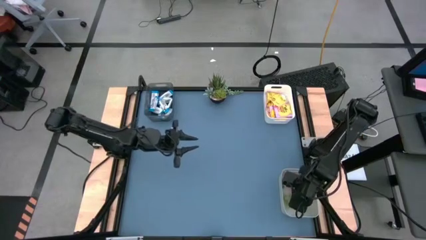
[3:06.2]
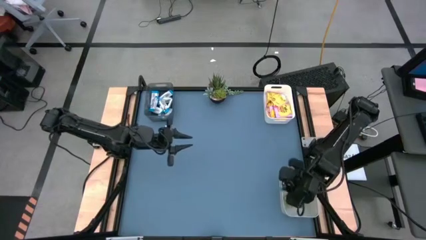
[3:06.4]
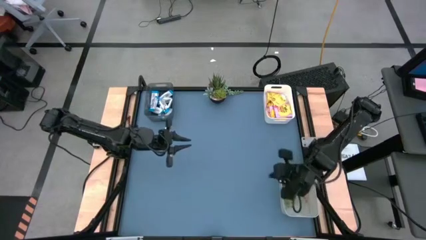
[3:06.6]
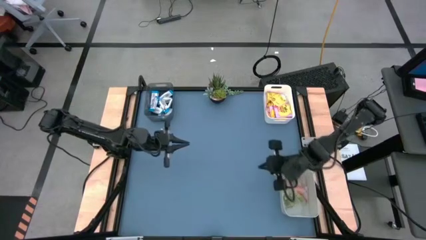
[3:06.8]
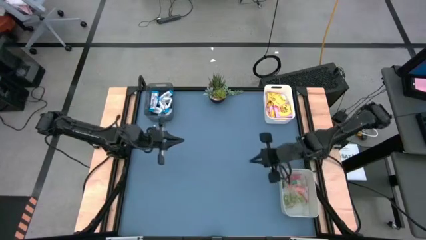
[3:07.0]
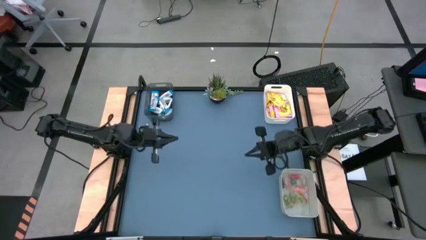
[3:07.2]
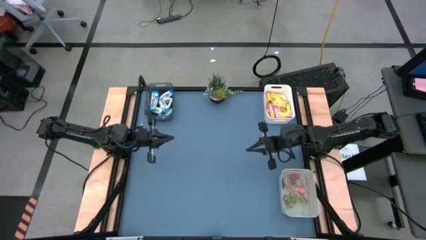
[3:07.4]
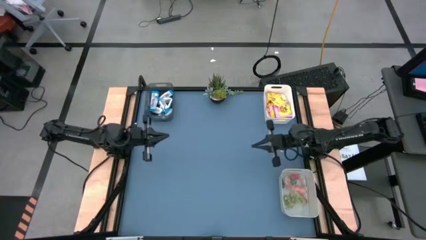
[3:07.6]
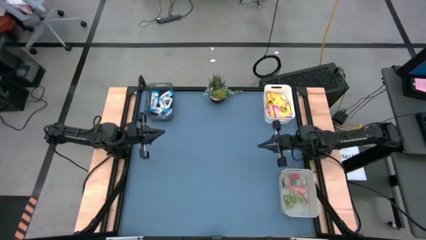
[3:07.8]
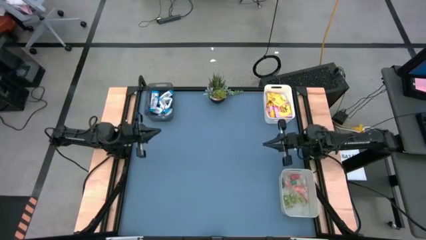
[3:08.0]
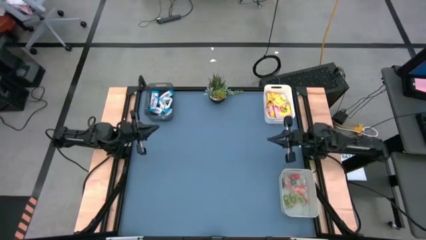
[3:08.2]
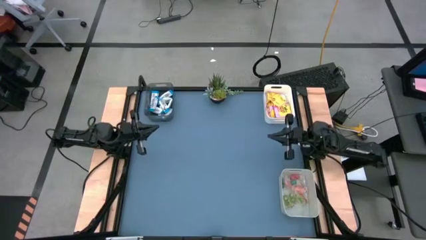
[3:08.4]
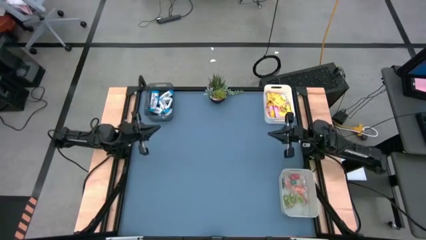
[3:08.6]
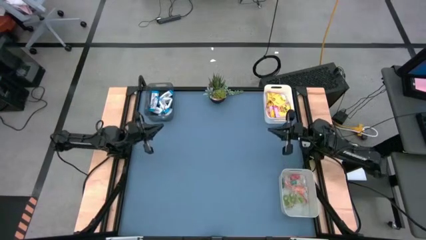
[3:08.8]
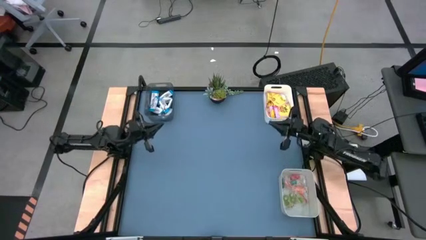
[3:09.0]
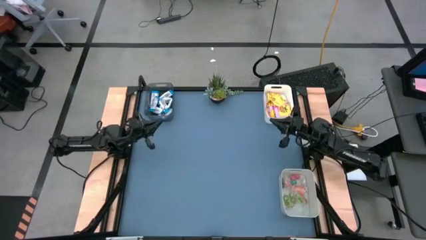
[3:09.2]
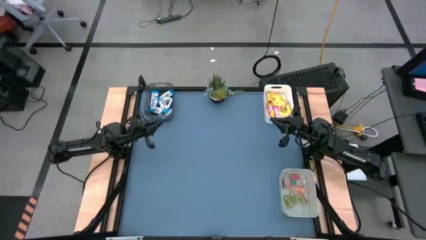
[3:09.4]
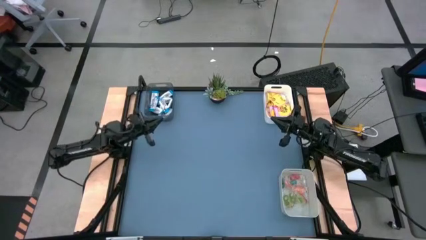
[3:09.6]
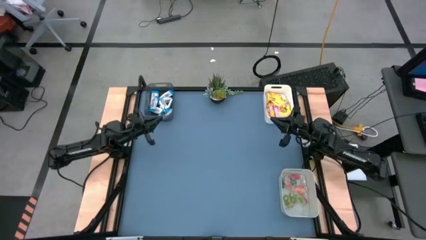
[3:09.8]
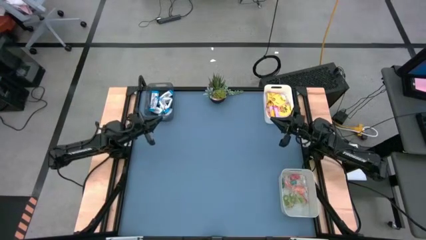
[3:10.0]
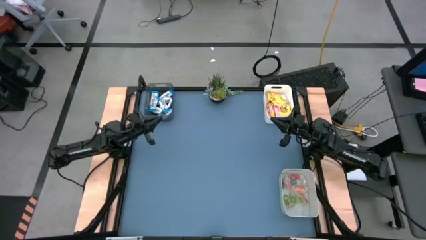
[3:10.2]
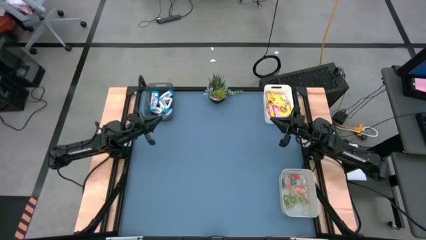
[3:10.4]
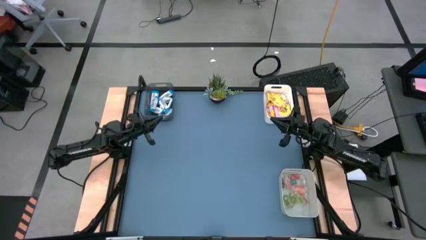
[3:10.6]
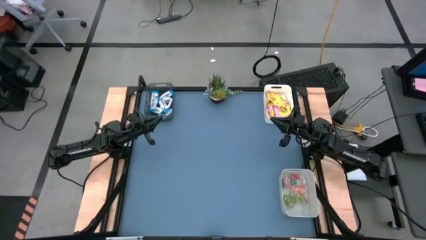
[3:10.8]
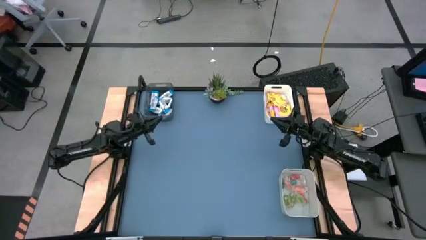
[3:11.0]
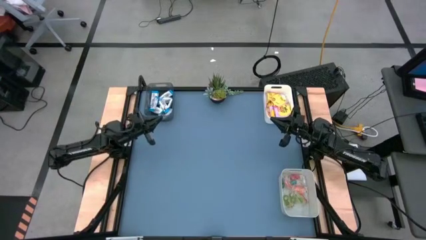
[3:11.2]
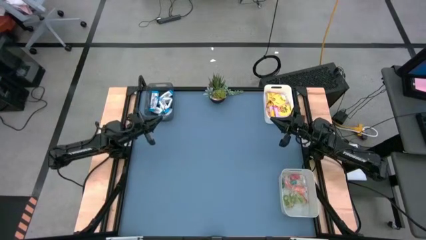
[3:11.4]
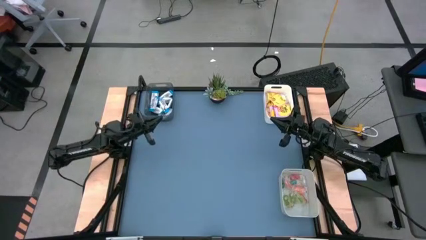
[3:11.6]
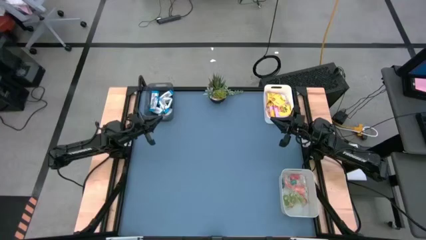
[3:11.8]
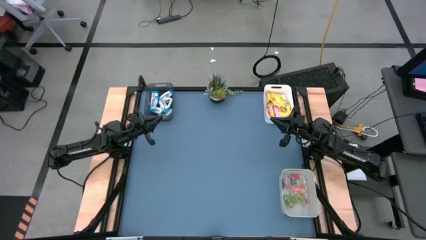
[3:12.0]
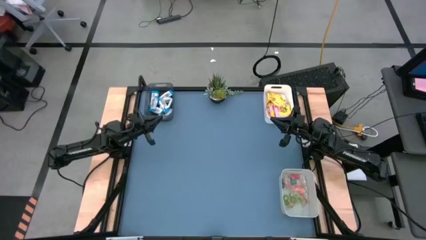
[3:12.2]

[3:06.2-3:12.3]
Task: Sort candy
Return to Home Position

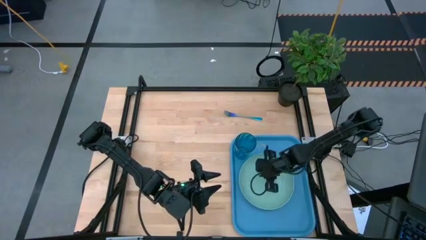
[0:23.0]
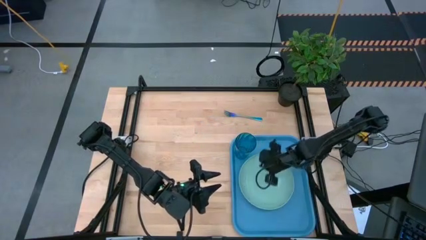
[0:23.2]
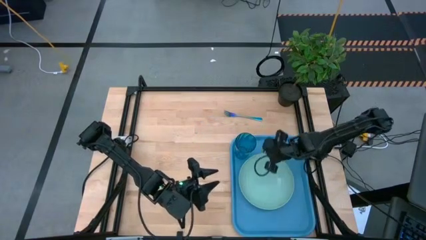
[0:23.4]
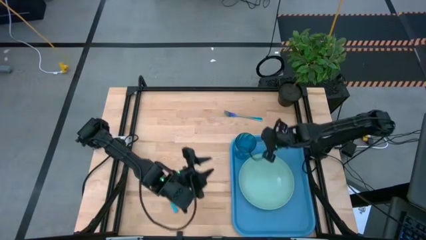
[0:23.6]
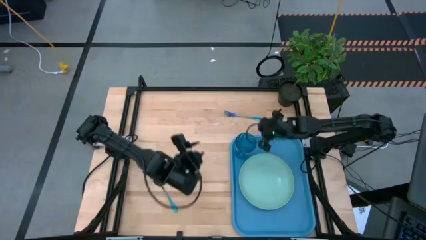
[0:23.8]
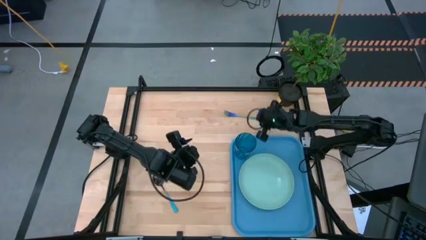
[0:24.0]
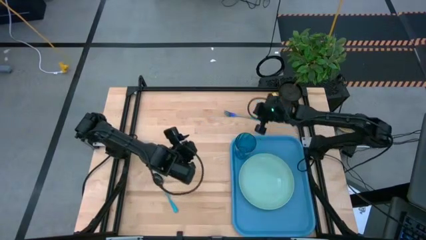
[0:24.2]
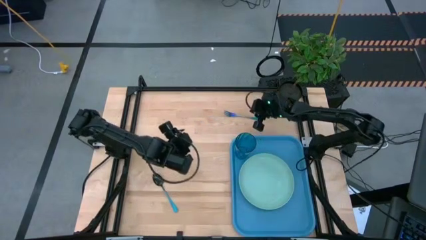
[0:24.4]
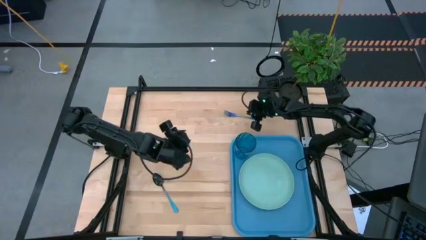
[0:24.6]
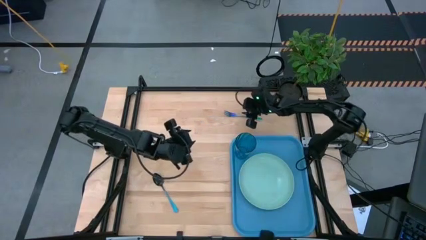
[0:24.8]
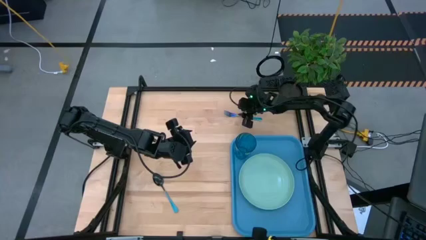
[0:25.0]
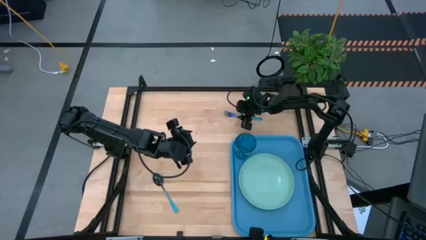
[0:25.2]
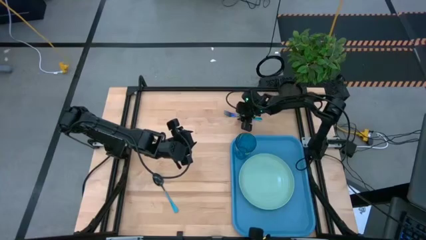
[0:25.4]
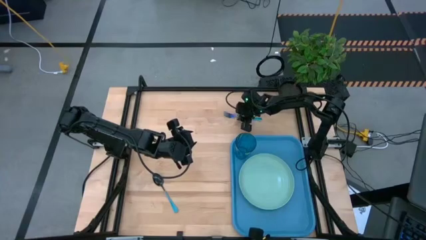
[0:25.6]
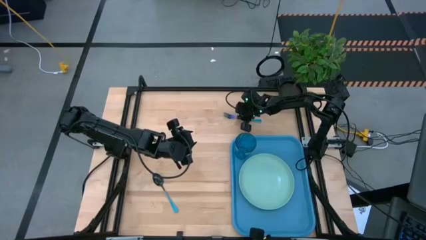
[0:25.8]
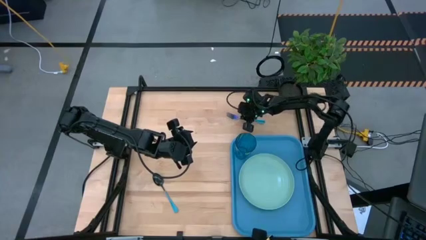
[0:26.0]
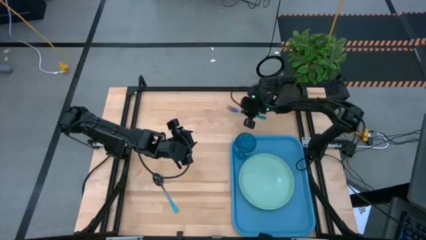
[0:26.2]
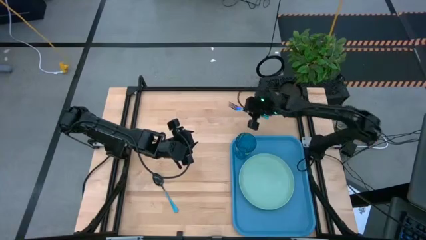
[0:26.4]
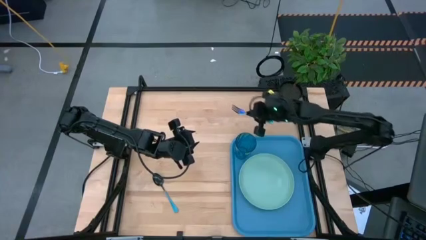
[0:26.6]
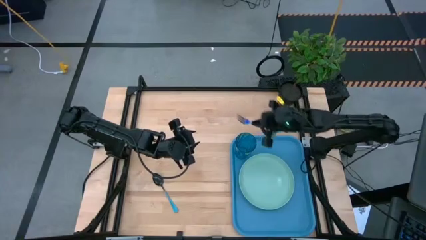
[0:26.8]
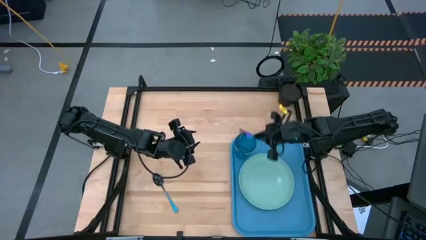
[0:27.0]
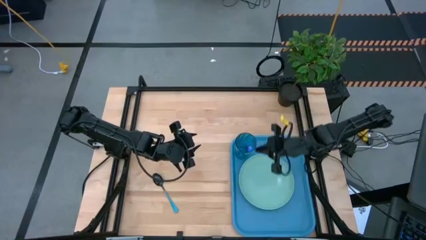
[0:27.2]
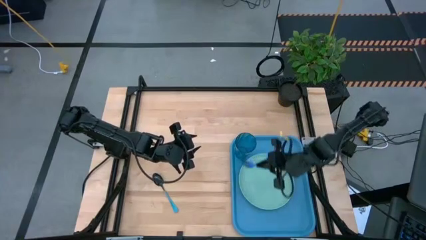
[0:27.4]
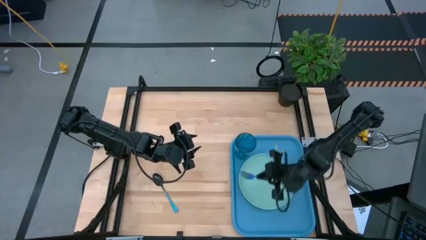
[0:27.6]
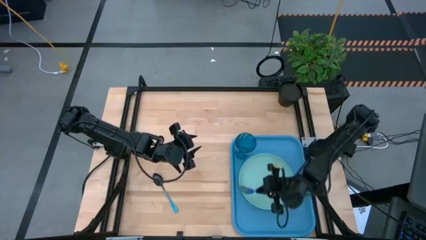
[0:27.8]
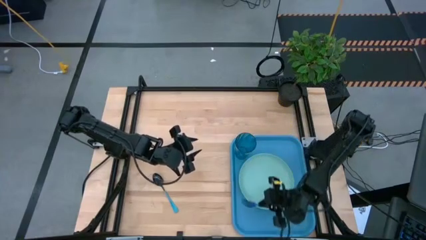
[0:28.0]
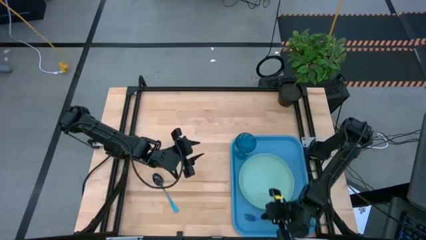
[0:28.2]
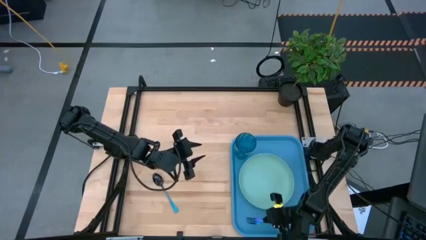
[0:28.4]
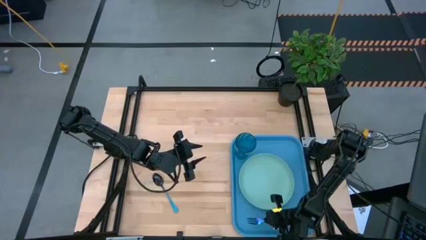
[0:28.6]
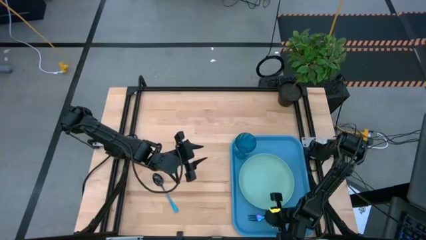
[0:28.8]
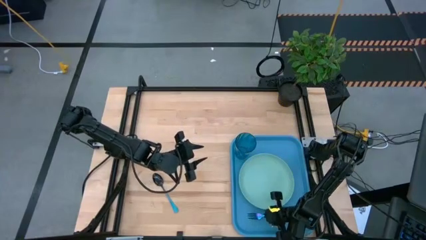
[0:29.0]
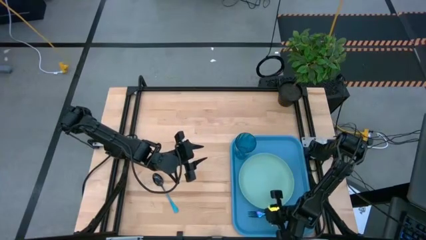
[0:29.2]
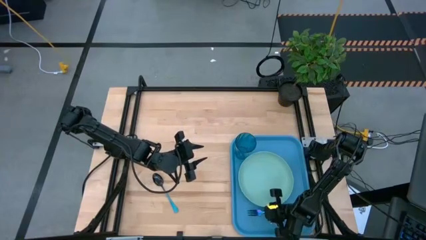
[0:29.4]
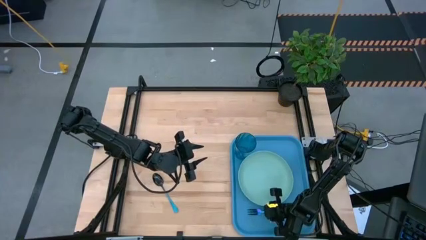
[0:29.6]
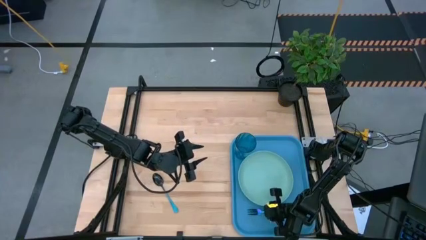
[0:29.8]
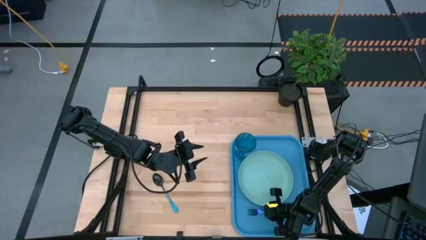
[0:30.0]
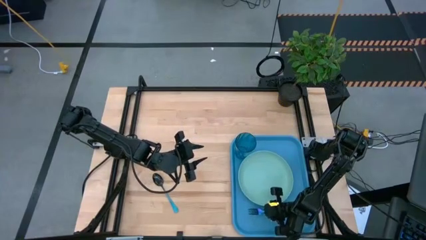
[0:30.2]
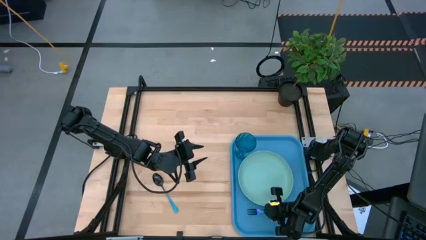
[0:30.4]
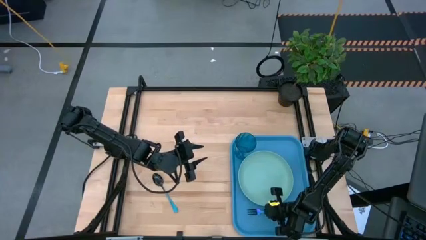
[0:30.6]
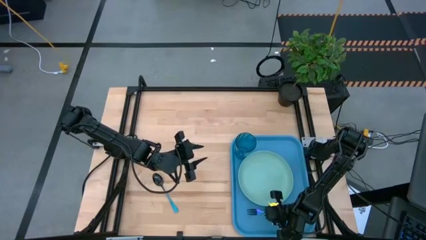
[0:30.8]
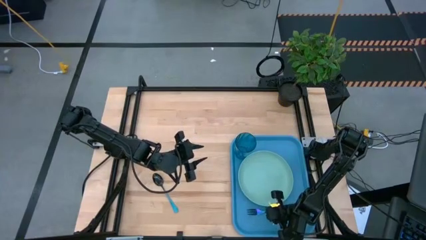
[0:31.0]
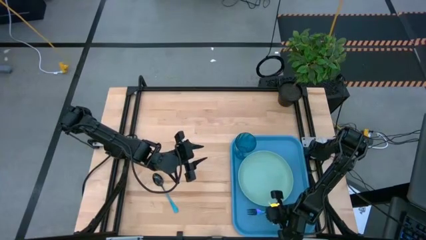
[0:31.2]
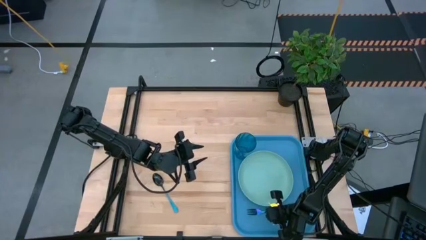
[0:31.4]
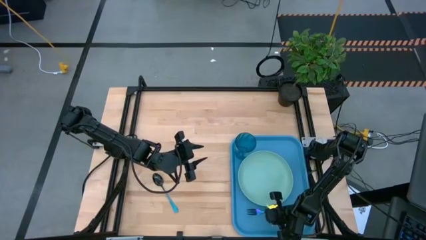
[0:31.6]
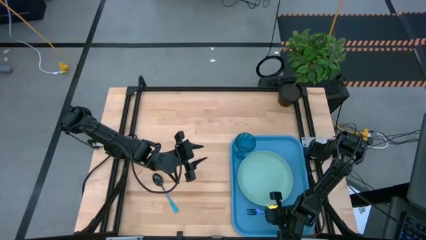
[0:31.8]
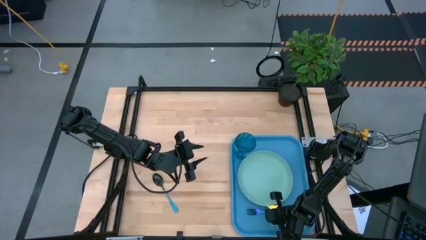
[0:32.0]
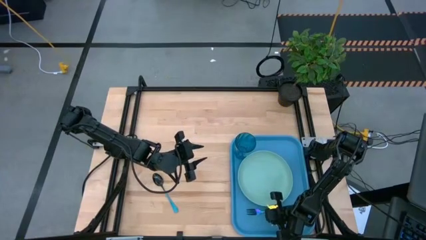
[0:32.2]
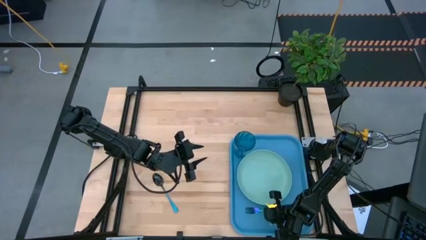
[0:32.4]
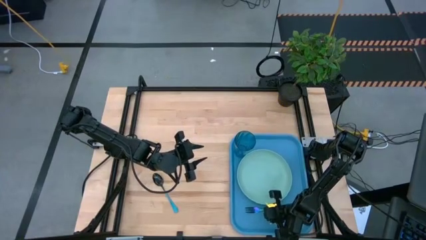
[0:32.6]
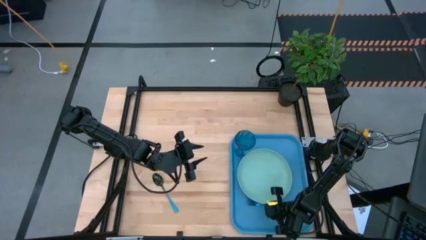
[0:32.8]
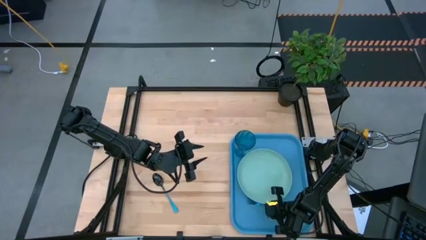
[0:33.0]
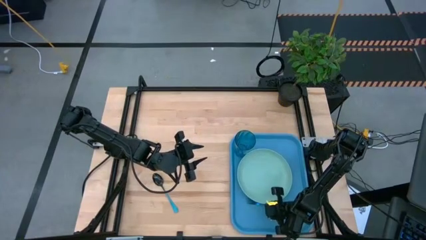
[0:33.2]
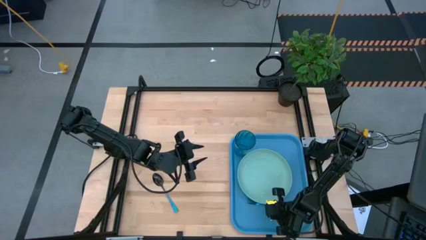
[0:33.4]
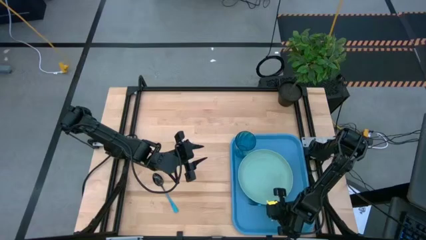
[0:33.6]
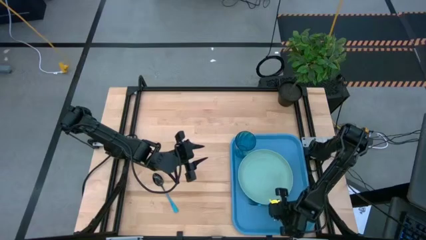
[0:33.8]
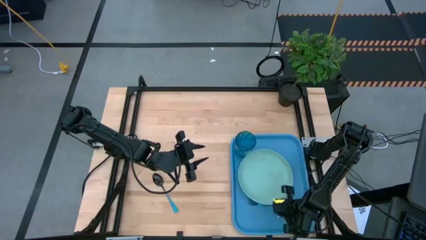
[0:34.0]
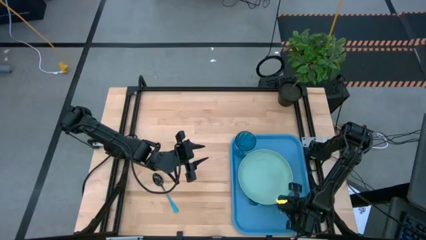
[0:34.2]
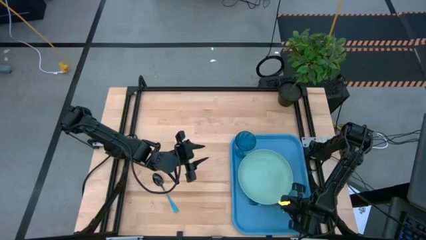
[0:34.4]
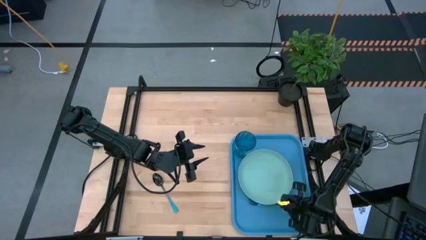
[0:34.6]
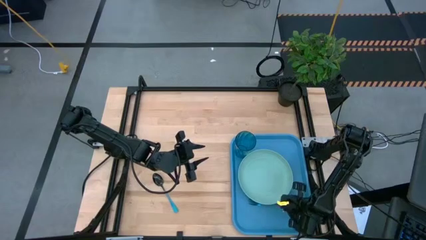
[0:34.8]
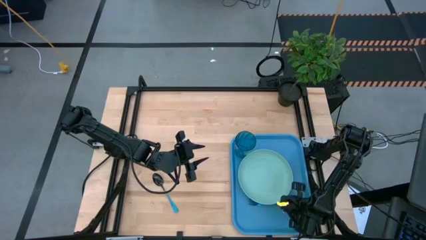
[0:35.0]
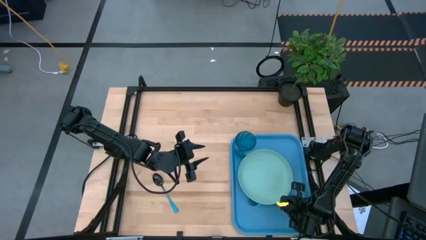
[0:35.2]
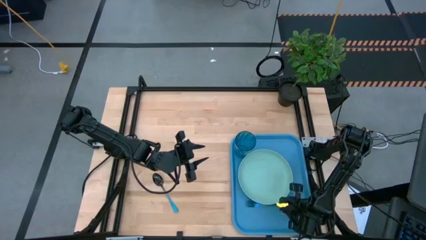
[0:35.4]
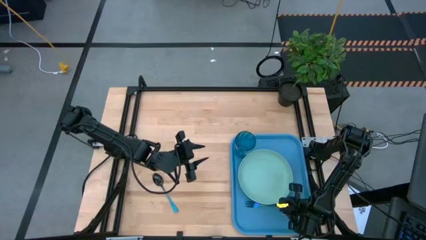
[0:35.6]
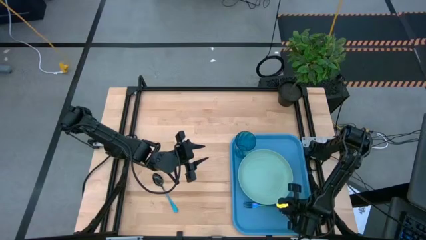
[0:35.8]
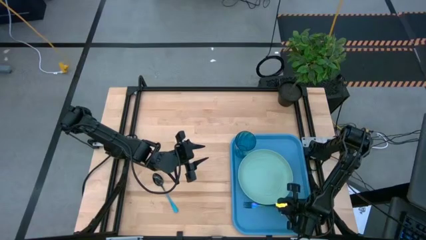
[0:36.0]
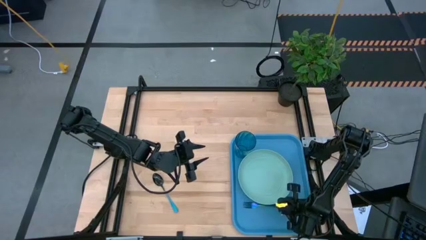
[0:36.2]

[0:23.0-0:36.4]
Task: Pick and place plate/cup/fork/spoon on tray
Put the blue fork on the blue serving tray to the left of the green plate
